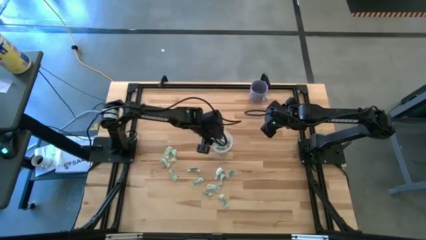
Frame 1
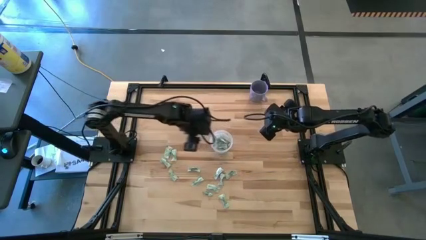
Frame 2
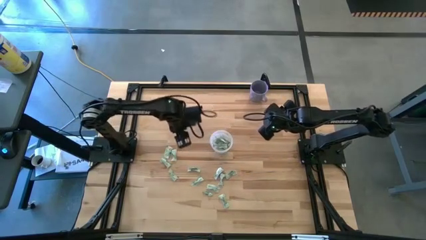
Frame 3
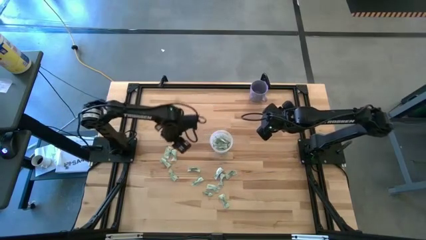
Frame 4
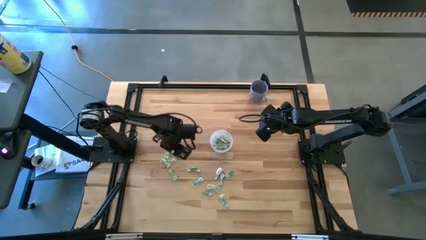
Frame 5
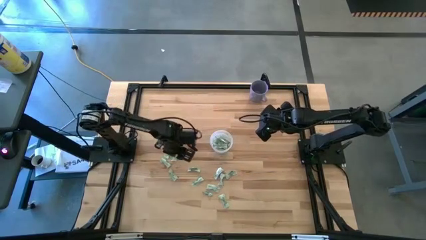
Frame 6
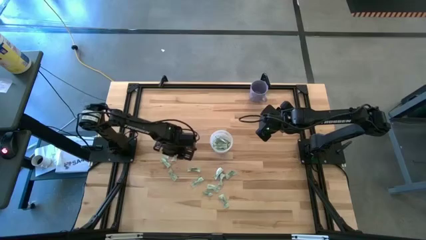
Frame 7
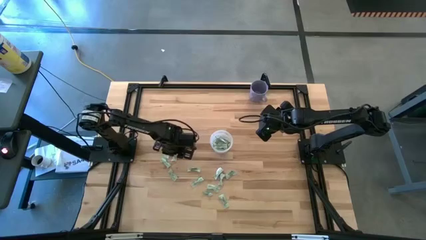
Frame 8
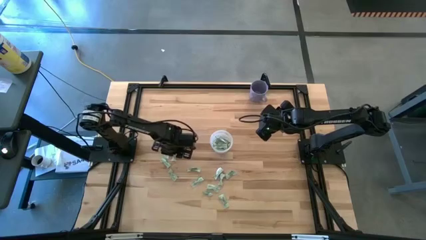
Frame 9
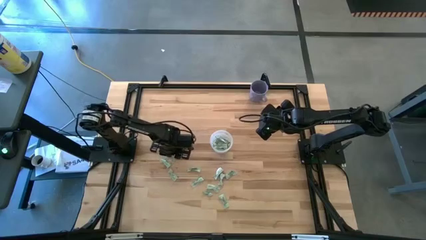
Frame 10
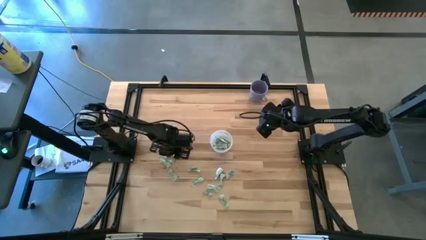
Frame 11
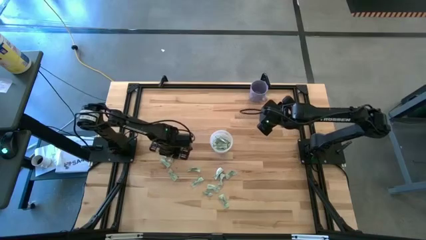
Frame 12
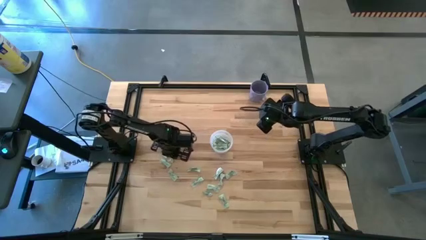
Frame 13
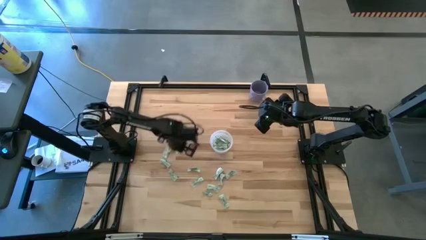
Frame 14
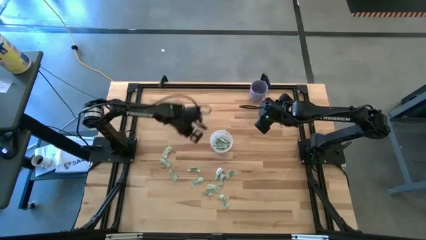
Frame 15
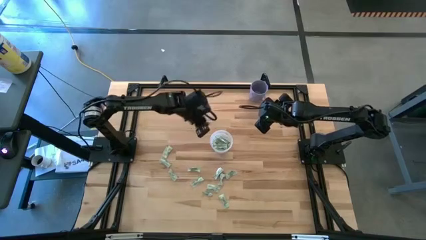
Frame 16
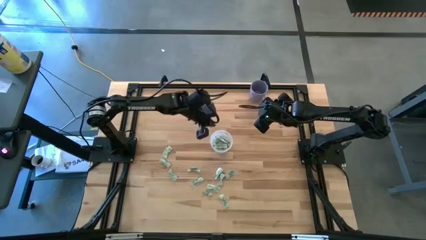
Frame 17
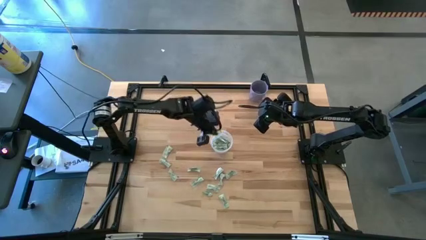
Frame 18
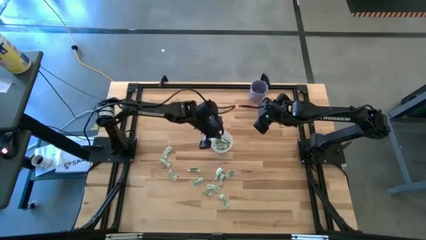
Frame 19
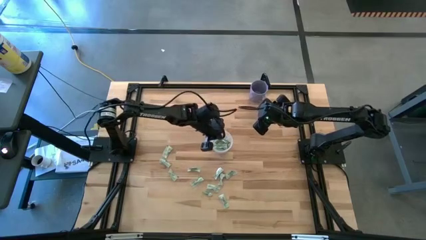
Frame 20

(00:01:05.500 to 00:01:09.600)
Task: Pick and place Stevia / Truvia into bins
Put the green stevia packet into the transparent container

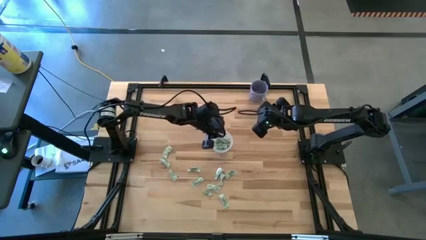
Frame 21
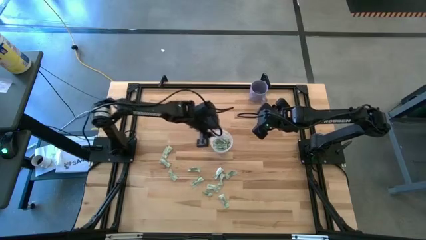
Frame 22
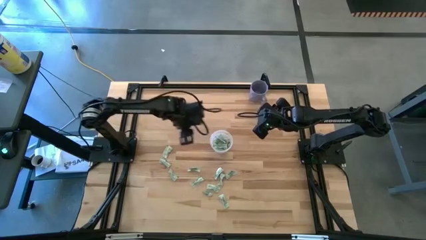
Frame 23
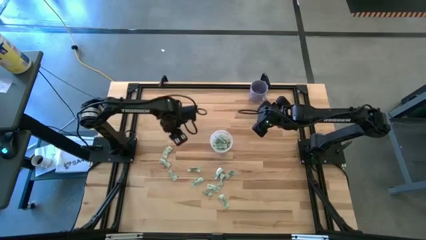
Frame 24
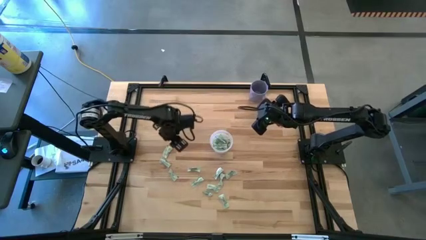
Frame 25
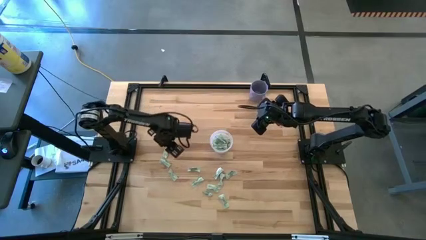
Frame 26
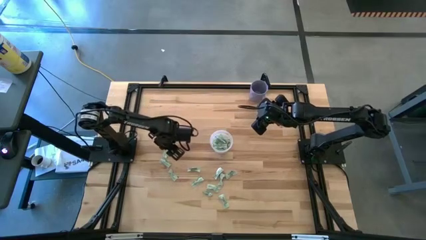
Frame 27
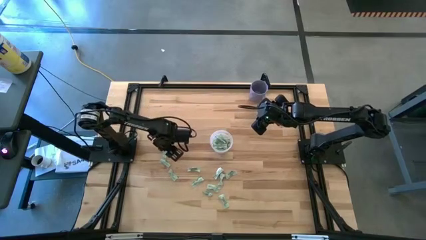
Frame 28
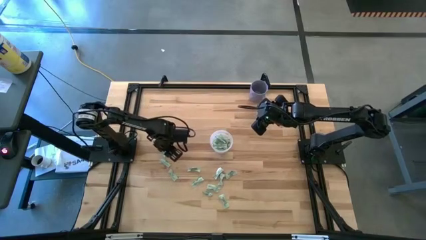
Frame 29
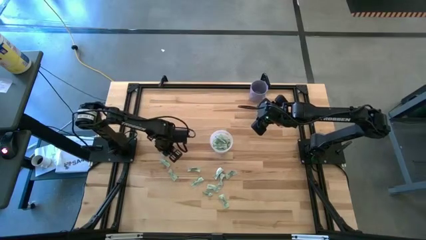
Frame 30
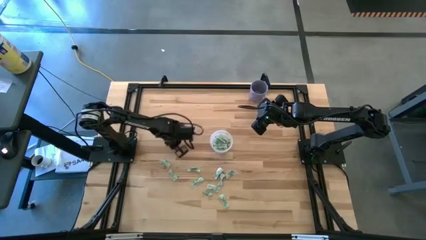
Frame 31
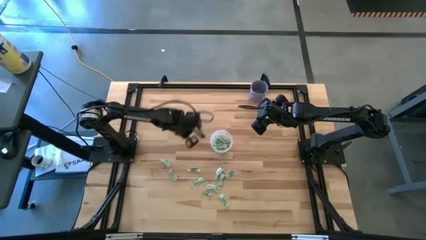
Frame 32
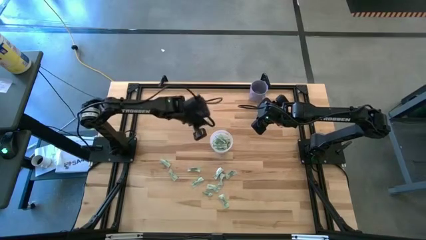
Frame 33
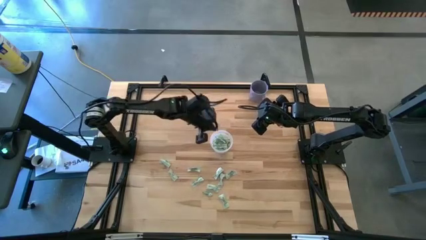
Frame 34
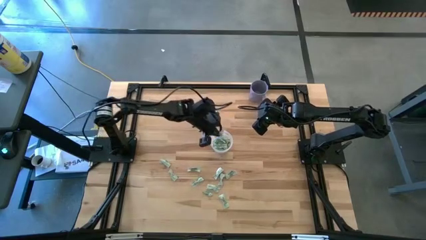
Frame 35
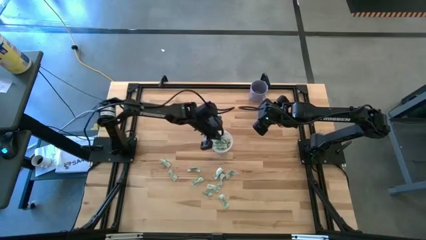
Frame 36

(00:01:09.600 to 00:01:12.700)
Put the green stevia packet into the transparent container

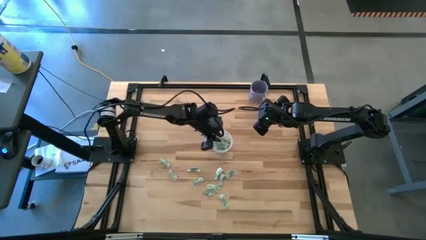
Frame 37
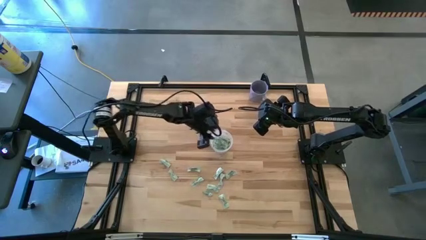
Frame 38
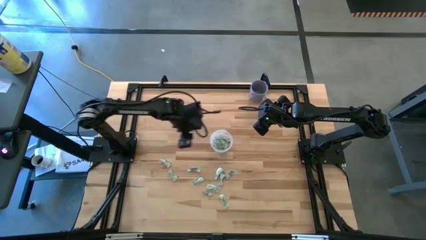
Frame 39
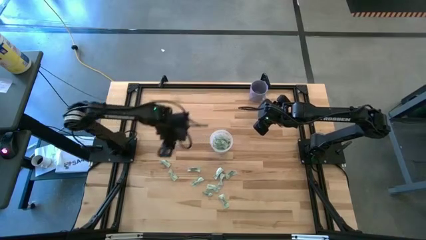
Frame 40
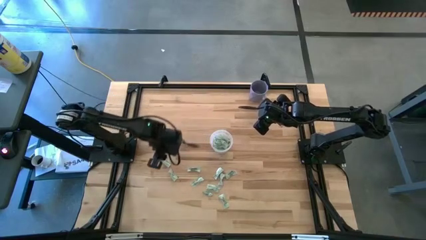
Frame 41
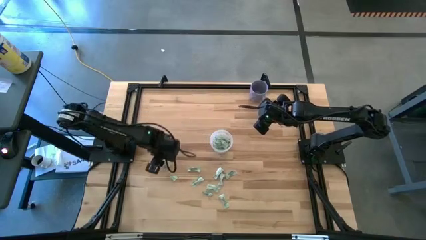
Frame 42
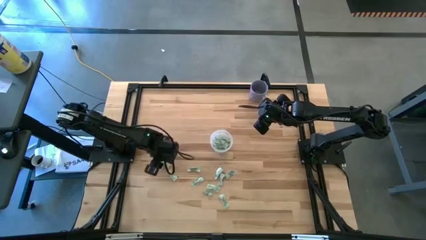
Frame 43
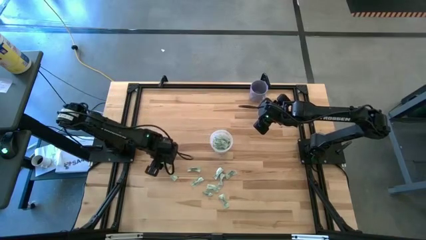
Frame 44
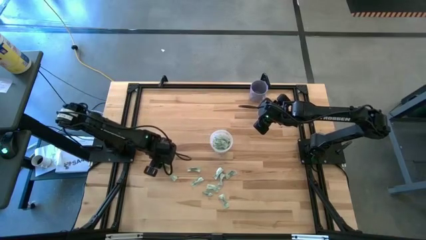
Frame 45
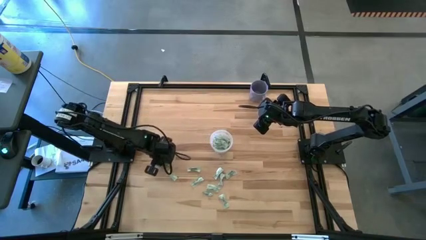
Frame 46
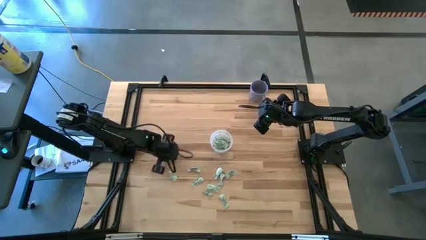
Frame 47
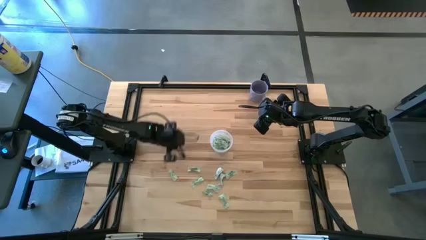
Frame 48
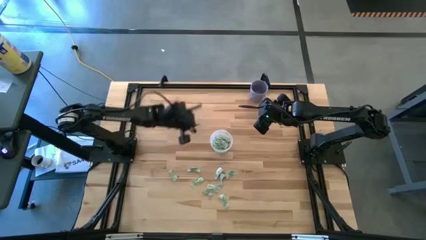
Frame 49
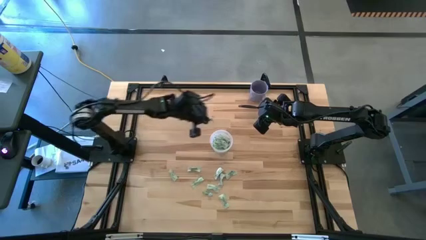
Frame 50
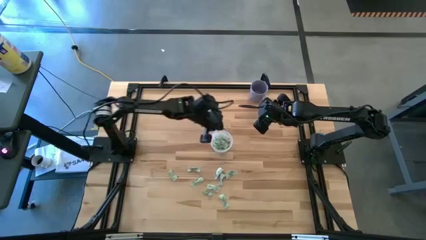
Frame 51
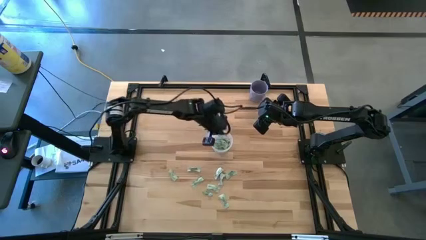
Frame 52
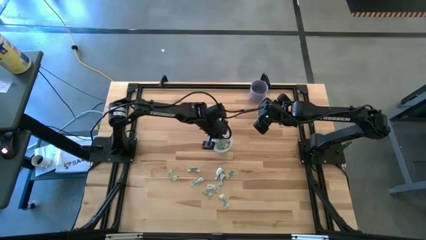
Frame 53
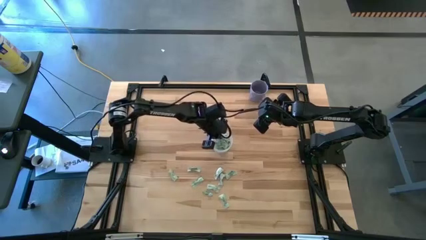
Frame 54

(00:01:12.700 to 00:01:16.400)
Put the green stevia packet into the transparent container

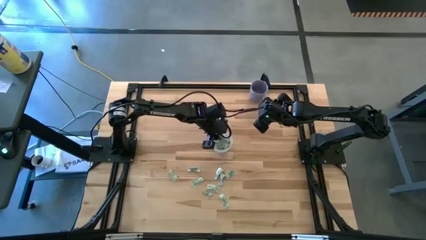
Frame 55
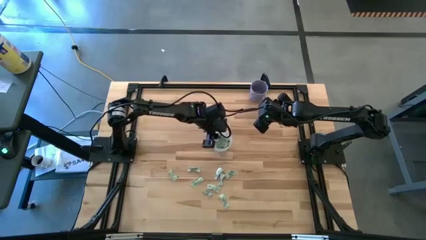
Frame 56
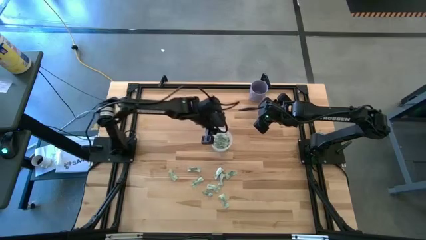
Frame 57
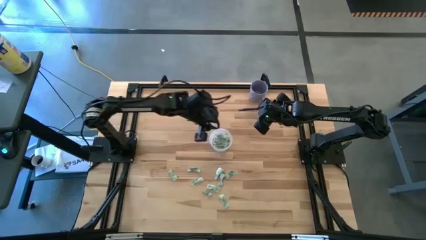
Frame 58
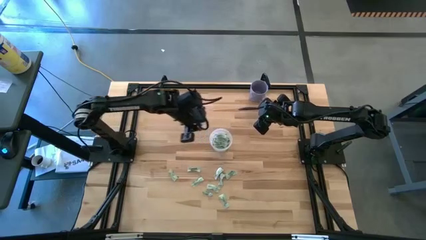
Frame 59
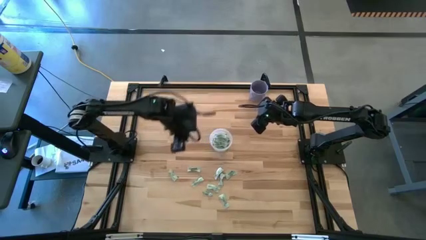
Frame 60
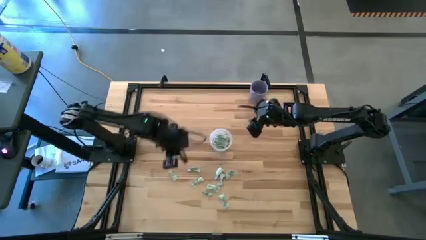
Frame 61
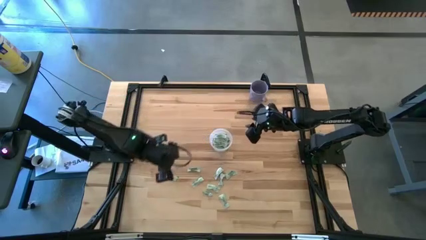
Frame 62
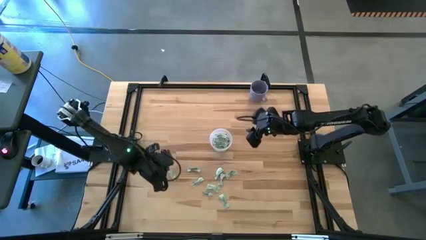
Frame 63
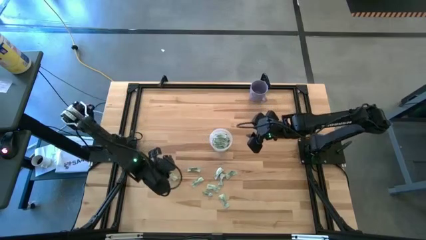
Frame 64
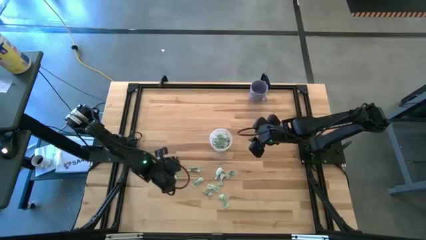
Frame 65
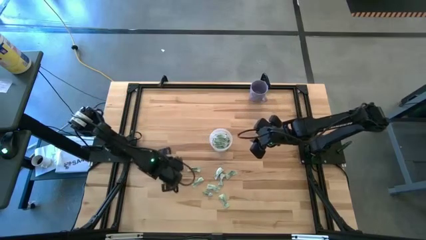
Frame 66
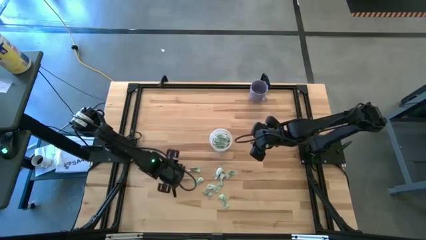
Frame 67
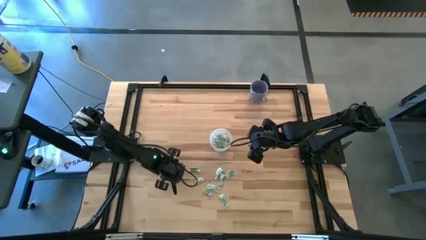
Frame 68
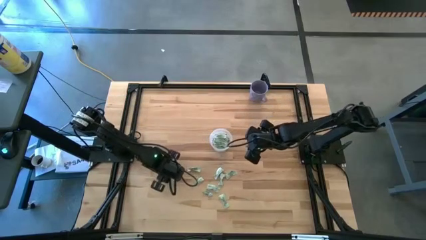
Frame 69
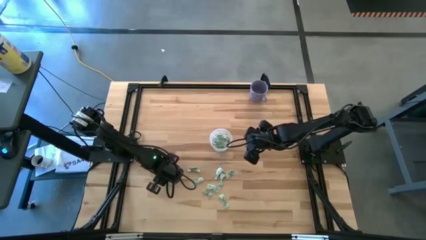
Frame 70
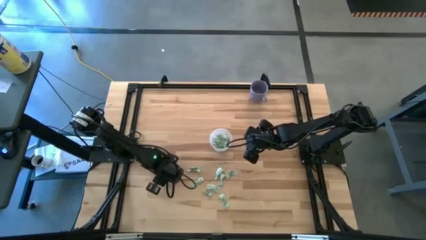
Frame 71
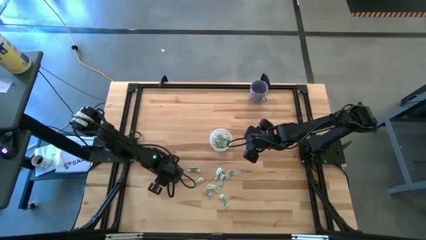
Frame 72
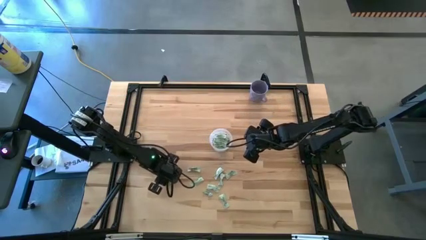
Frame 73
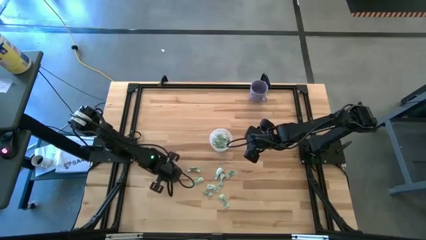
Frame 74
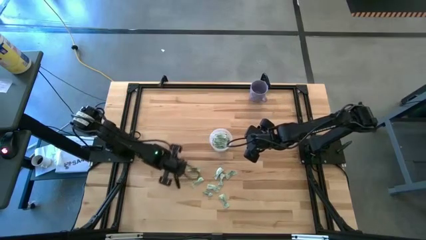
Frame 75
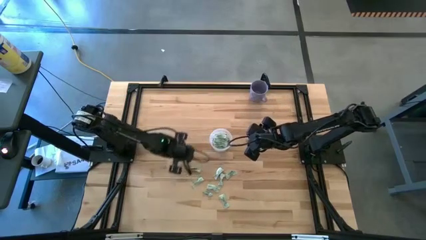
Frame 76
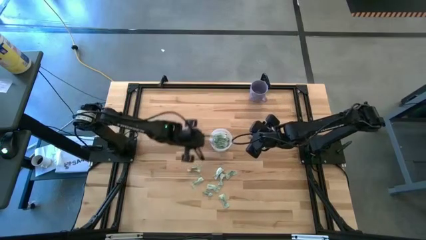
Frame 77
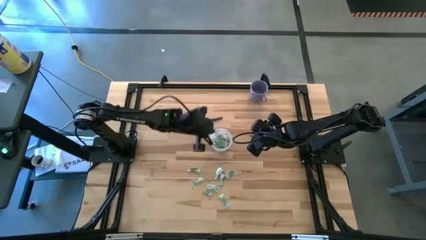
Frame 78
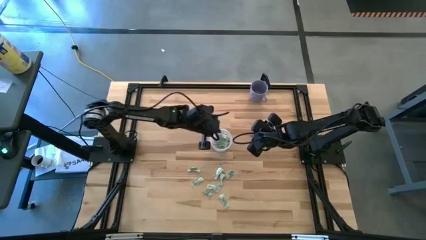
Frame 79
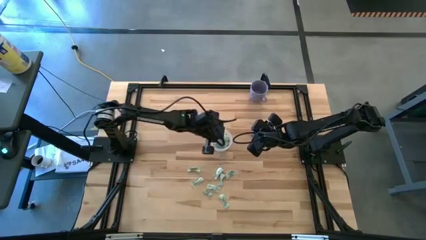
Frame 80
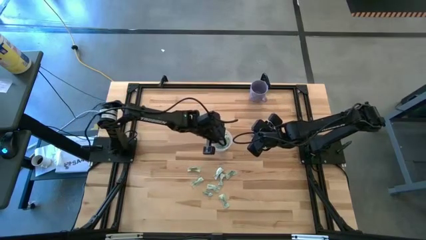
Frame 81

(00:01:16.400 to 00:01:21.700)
Put the green stevia packet into the transparent container

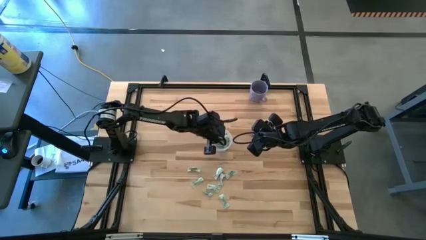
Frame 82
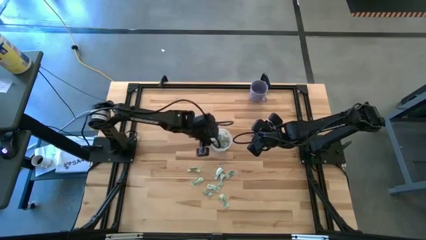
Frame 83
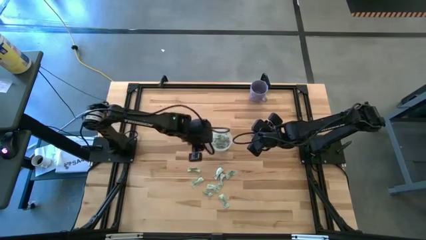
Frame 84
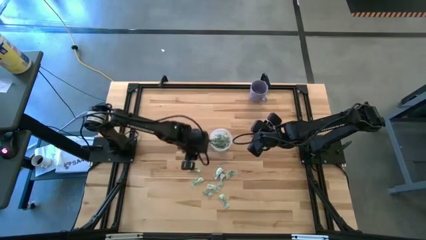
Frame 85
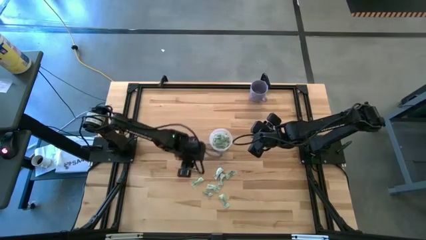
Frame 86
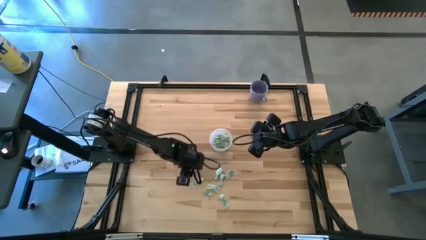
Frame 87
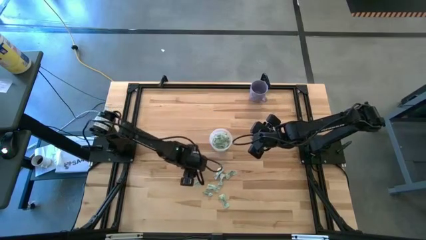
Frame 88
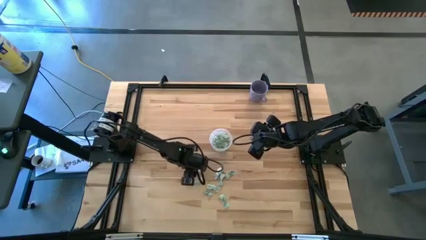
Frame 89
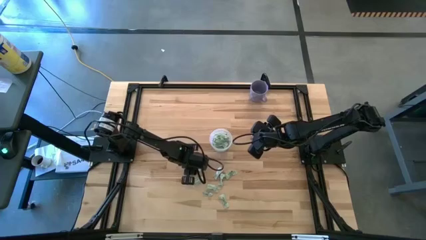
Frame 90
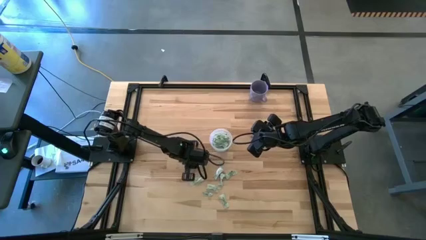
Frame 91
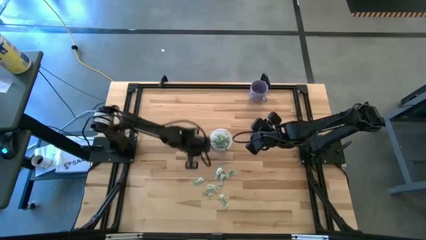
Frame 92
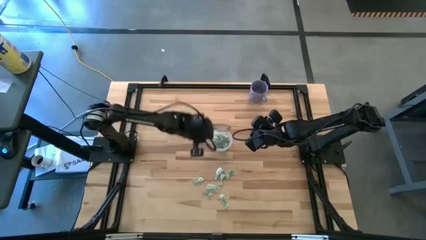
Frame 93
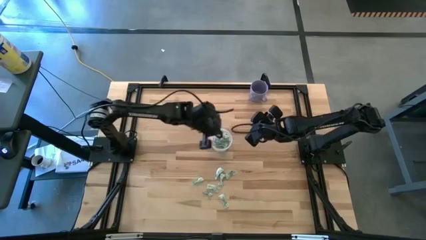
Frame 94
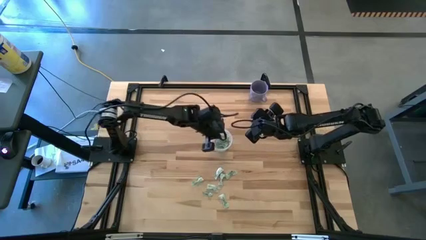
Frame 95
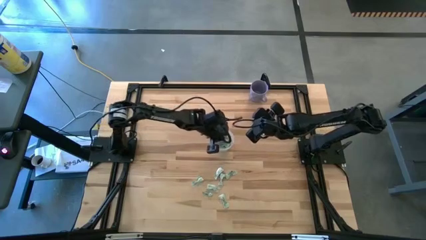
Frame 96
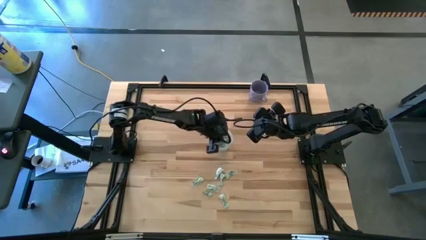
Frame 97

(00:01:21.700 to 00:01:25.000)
Put the green stevia packet into the transparent container
